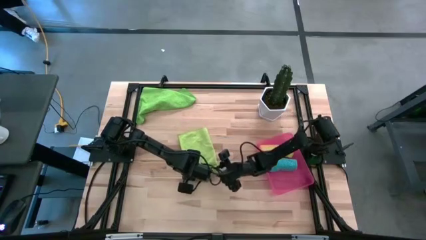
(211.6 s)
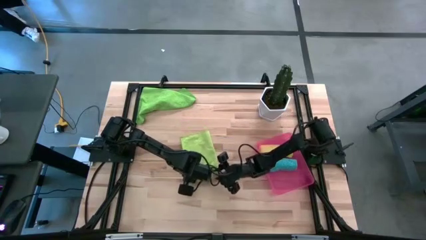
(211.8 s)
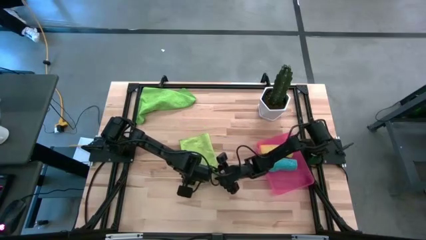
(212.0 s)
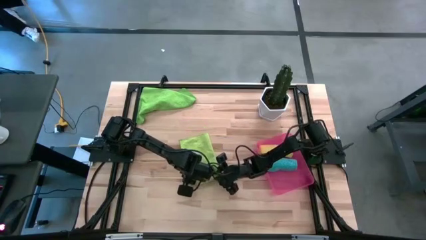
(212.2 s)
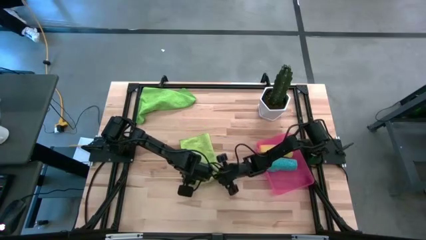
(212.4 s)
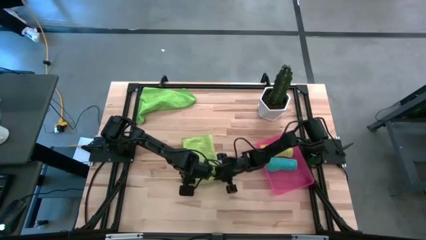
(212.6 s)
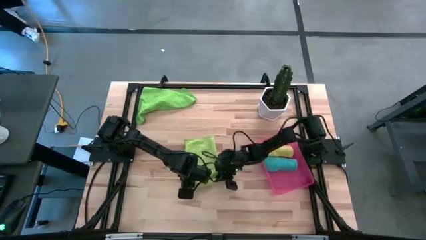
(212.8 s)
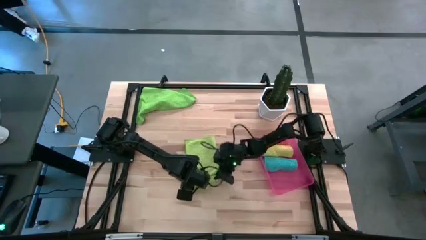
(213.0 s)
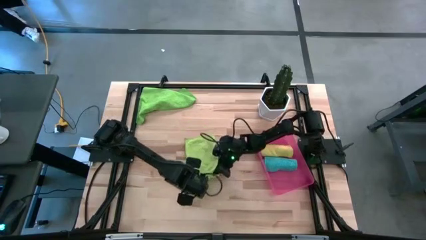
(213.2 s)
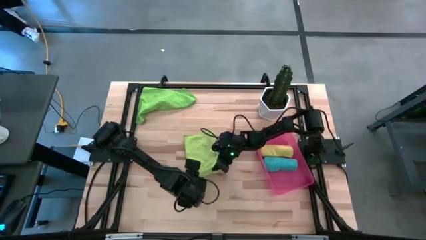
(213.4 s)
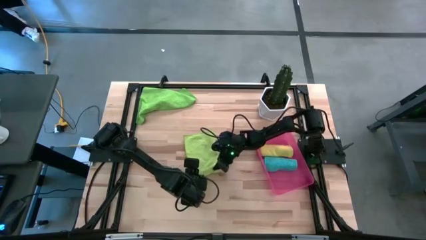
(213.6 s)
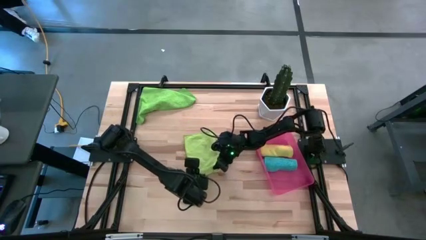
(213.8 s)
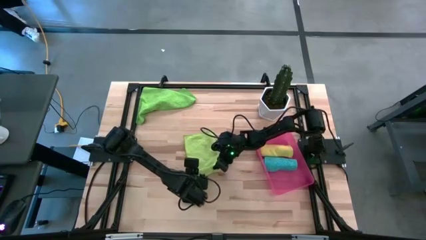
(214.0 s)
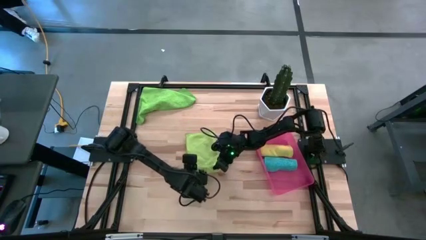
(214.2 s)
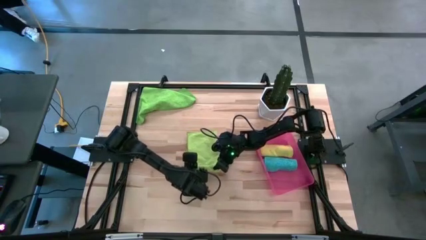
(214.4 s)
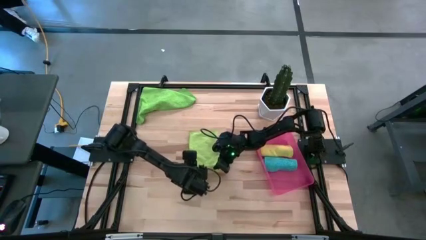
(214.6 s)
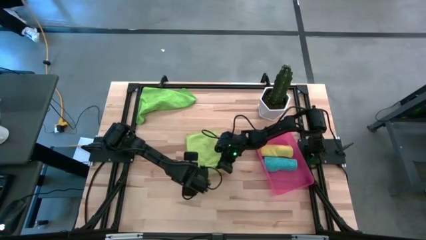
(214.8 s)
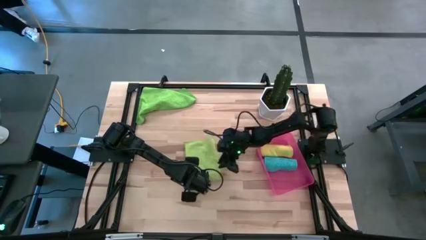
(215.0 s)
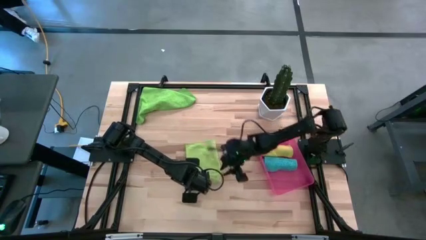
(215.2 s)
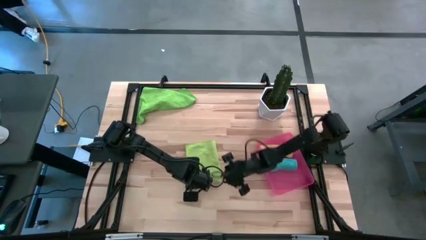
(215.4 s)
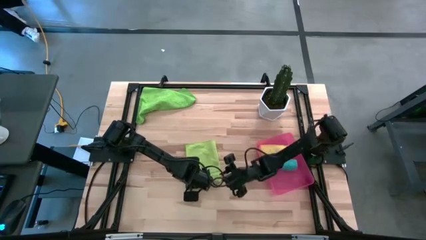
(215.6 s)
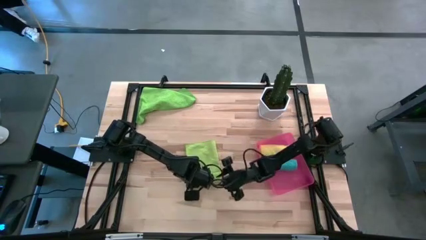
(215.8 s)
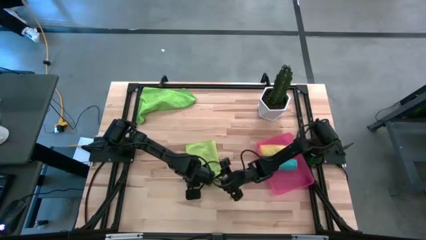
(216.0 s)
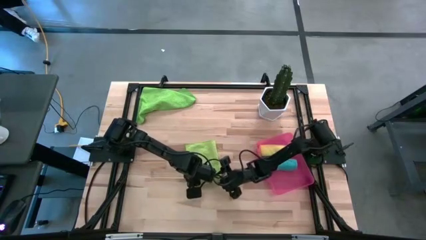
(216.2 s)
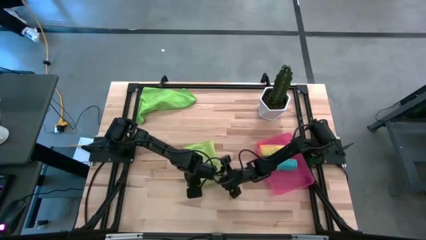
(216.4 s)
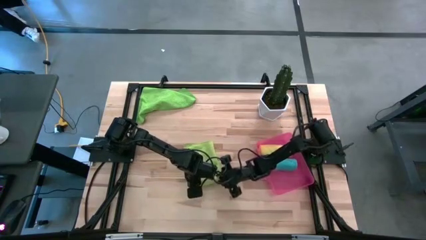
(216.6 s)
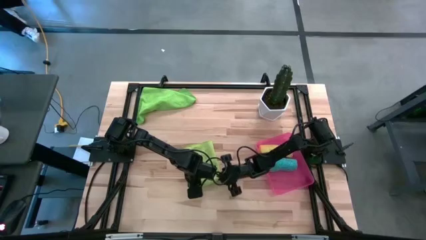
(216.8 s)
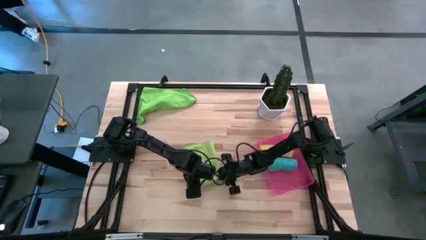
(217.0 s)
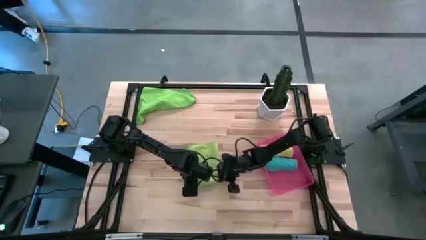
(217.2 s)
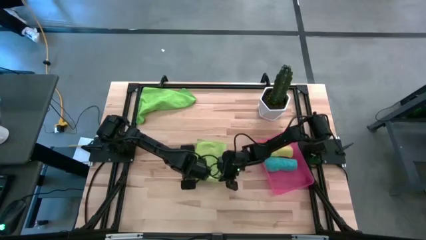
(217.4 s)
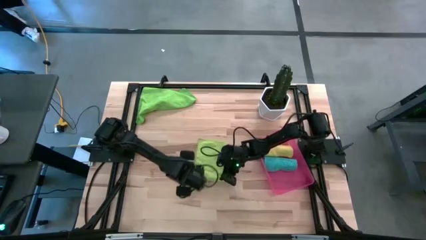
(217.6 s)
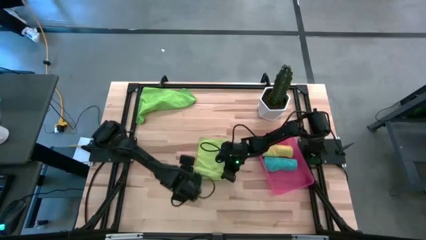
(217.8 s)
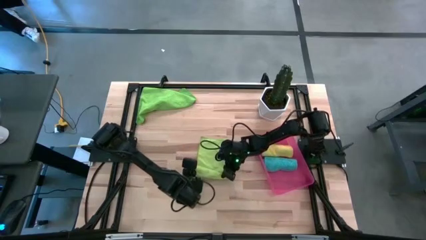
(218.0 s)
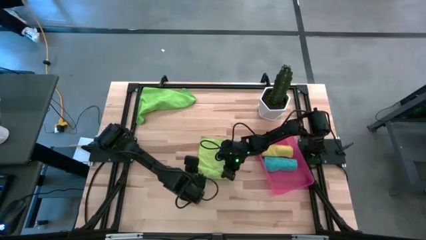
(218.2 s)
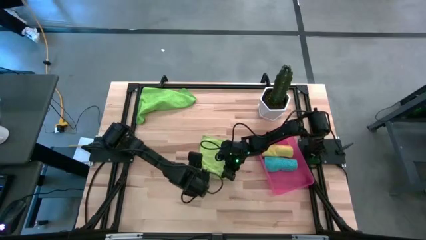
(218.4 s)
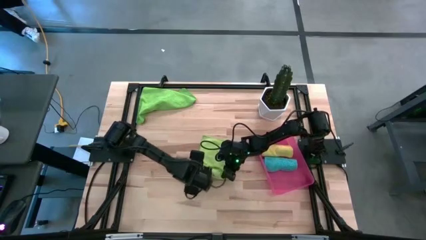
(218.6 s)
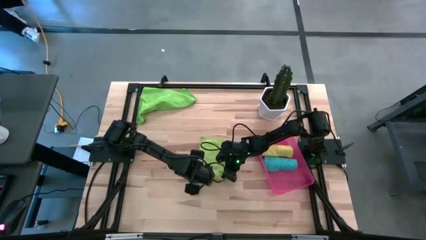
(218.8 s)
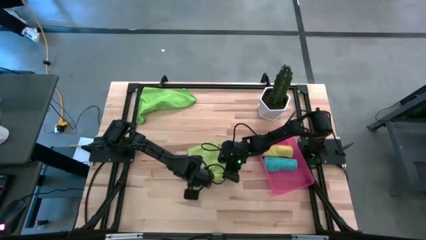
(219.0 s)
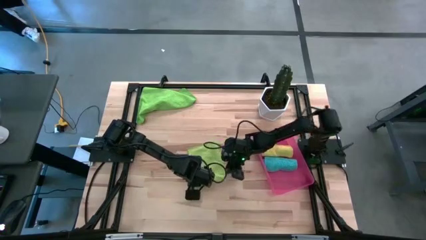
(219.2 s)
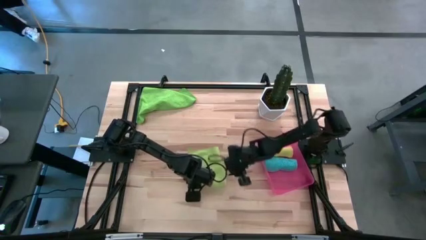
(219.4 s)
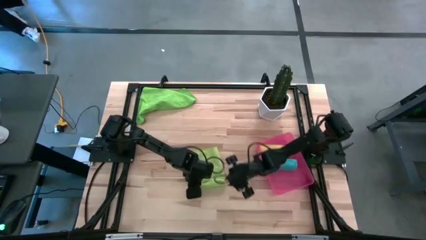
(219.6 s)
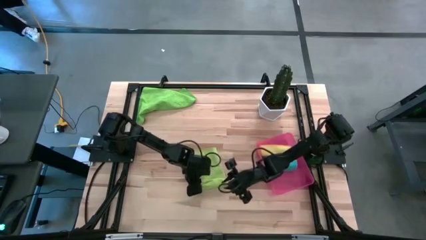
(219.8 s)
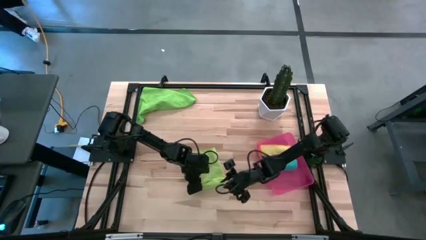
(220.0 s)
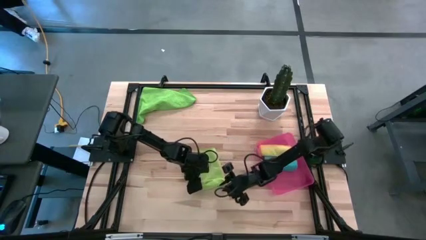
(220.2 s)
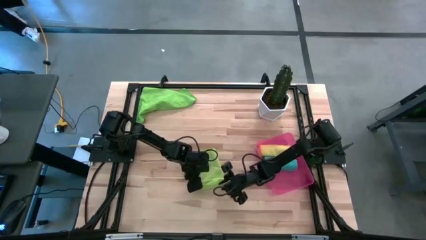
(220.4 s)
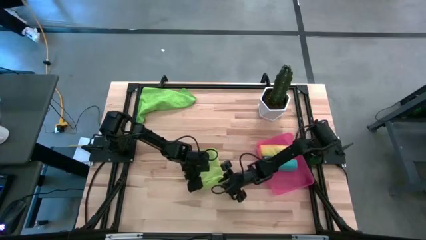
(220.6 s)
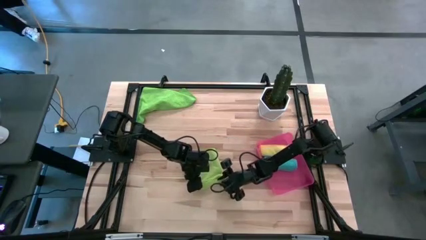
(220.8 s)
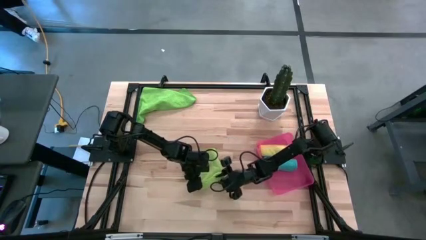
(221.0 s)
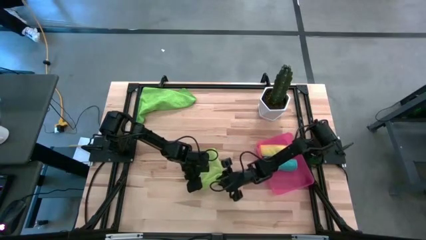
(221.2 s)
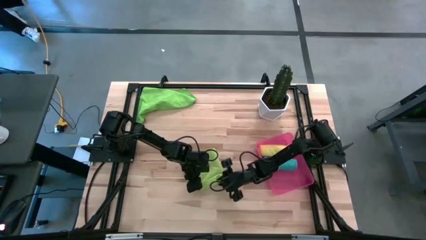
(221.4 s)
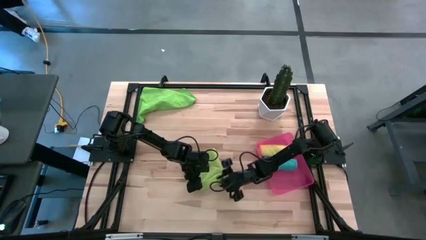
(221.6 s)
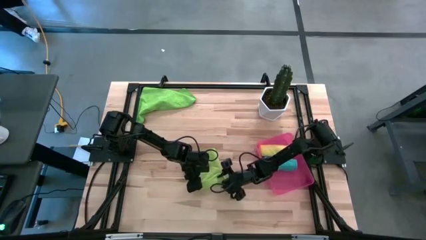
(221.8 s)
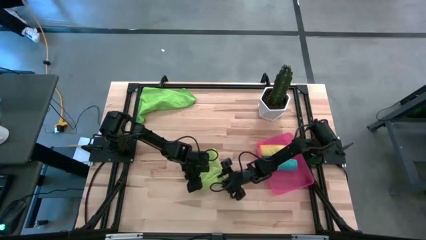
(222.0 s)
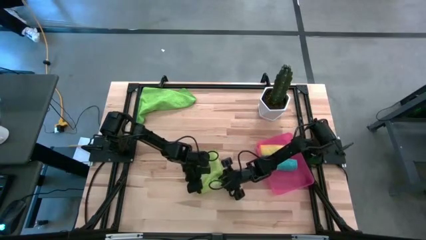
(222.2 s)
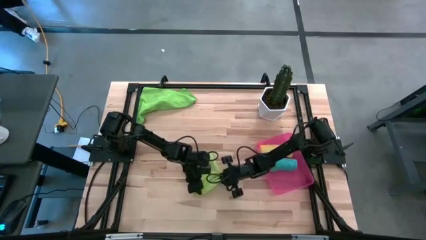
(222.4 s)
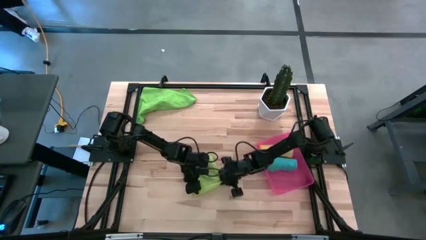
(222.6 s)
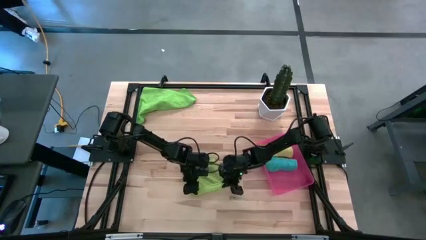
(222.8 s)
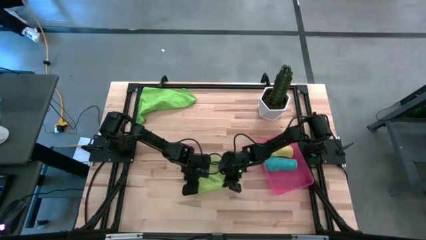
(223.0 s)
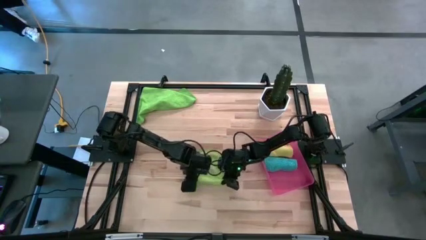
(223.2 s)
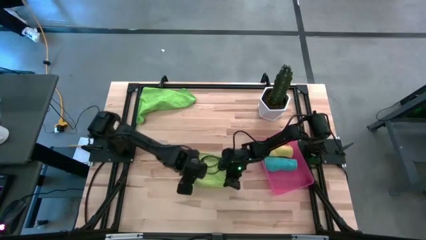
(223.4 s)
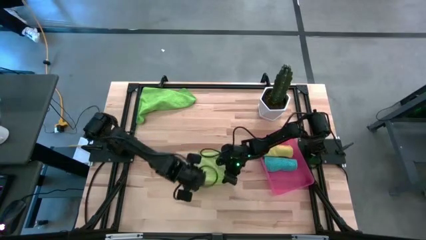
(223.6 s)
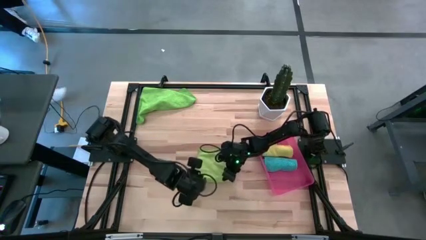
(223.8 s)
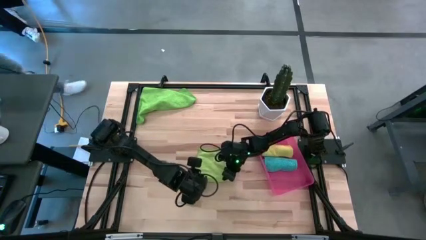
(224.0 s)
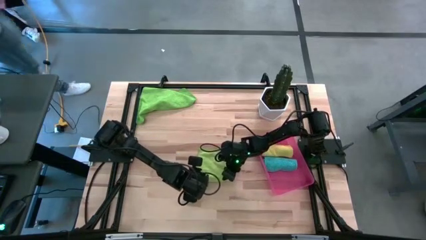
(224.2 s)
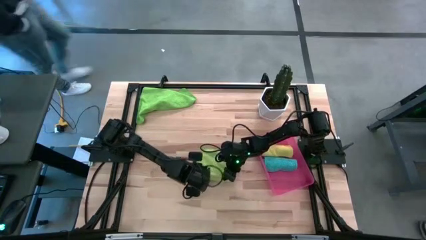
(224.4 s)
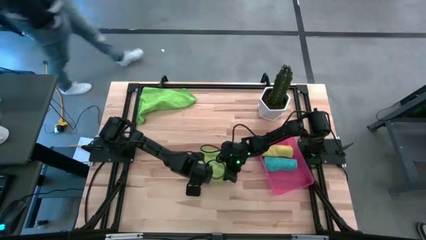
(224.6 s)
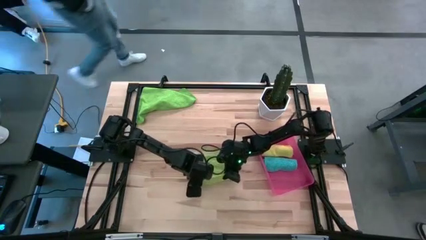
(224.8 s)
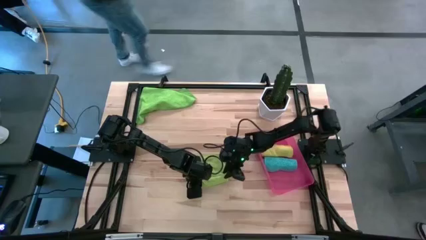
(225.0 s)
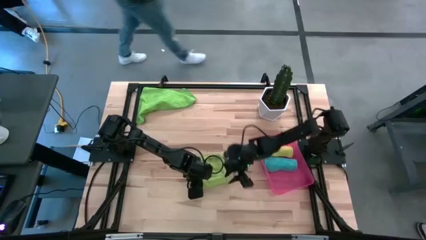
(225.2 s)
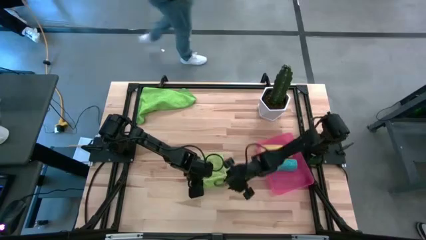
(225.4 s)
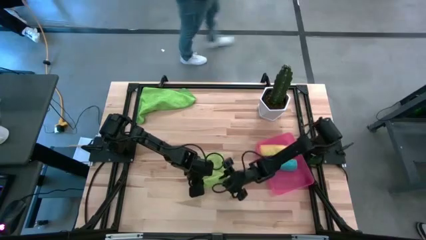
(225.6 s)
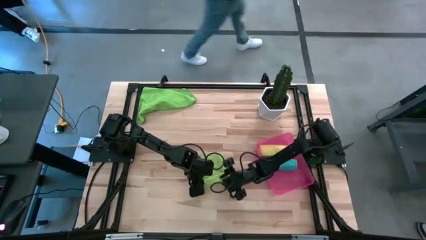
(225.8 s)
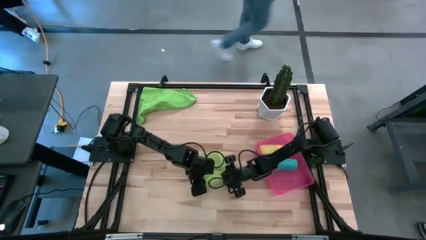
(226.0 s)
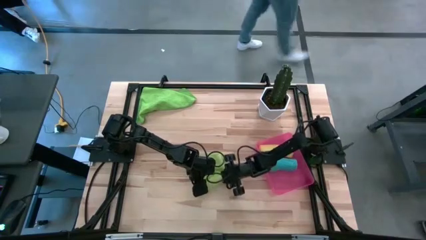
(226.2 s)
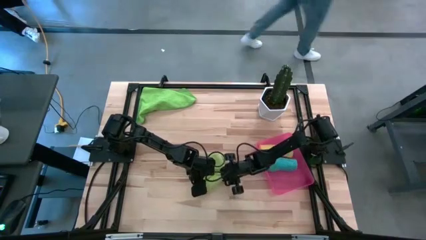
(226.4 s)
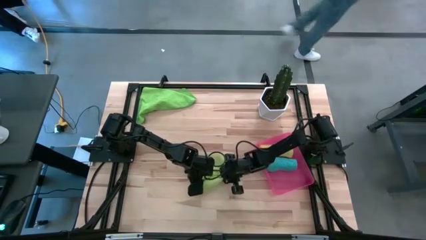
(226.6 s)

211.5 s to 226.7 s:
Task: Roll microfiber towels into tight, uniform cylinder then place into a basket
Roll the bottom light green microfiber towel
